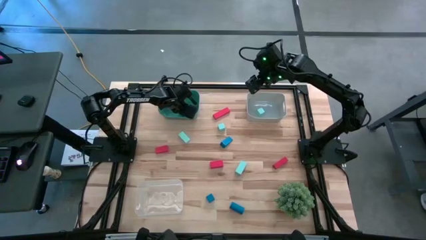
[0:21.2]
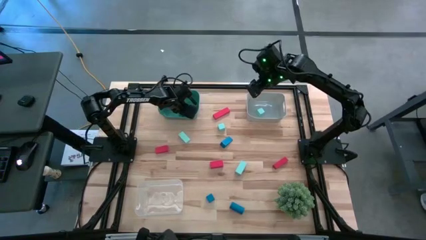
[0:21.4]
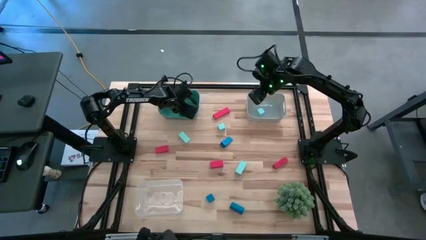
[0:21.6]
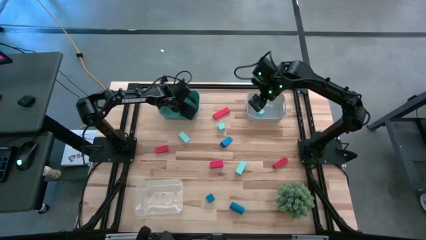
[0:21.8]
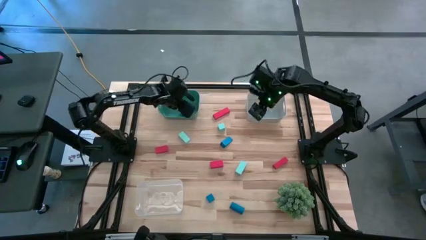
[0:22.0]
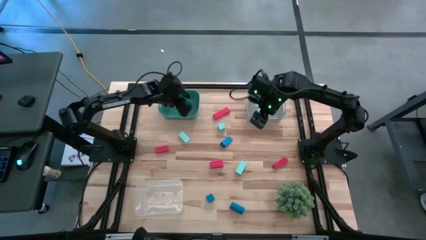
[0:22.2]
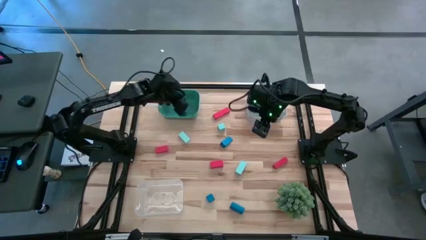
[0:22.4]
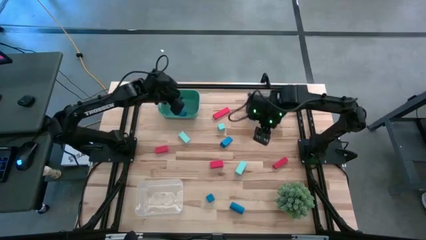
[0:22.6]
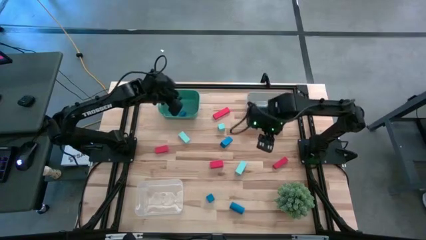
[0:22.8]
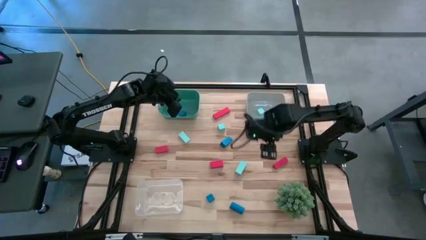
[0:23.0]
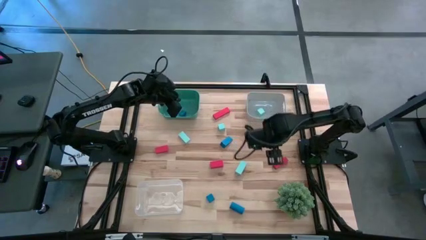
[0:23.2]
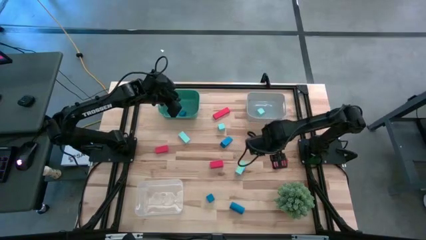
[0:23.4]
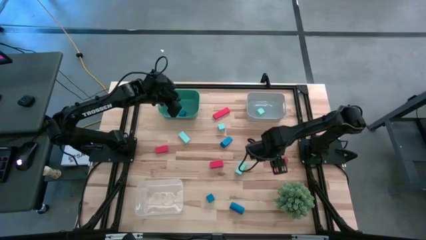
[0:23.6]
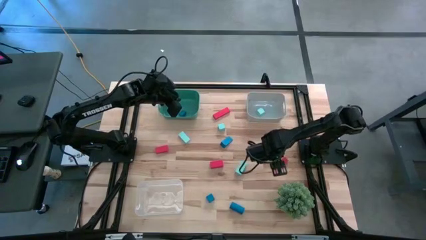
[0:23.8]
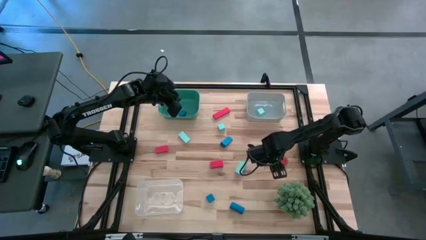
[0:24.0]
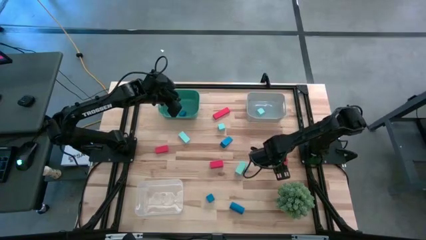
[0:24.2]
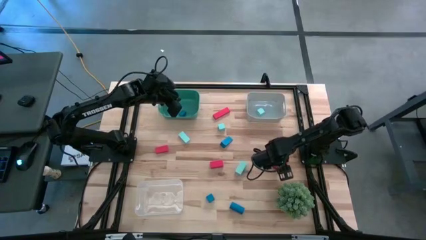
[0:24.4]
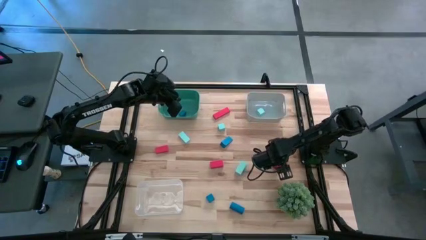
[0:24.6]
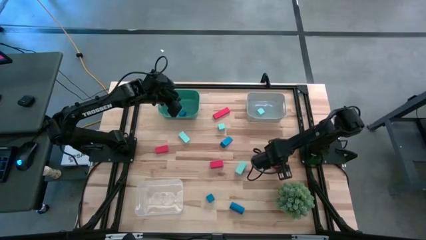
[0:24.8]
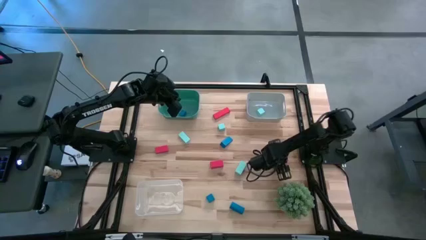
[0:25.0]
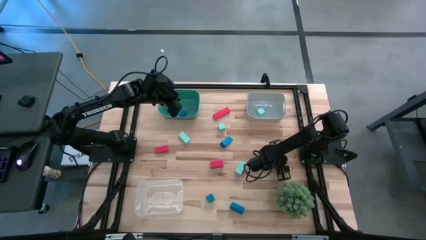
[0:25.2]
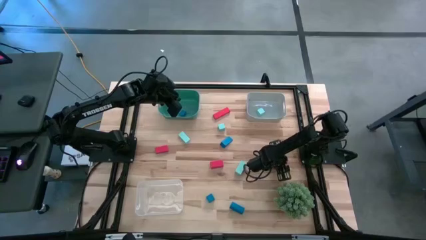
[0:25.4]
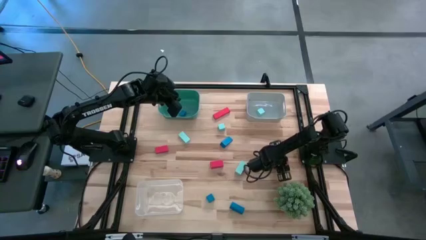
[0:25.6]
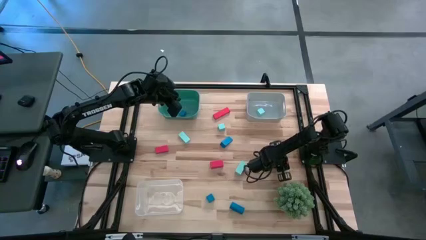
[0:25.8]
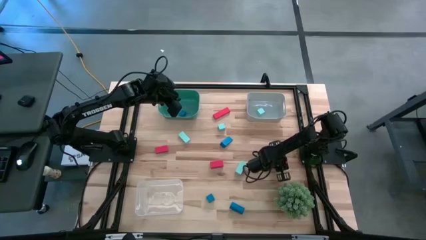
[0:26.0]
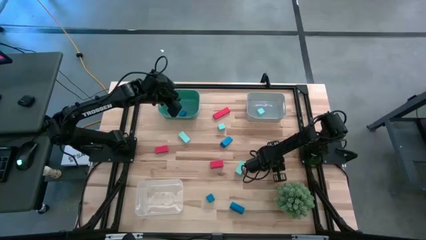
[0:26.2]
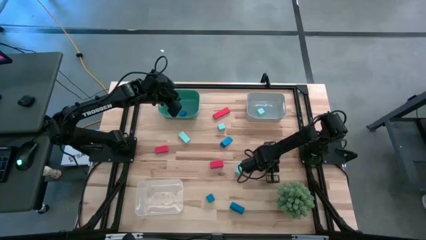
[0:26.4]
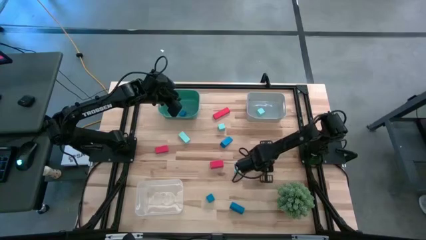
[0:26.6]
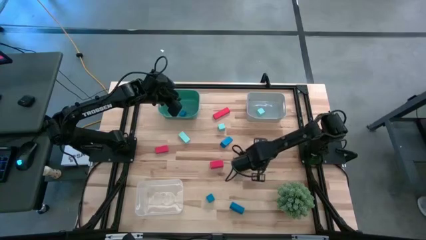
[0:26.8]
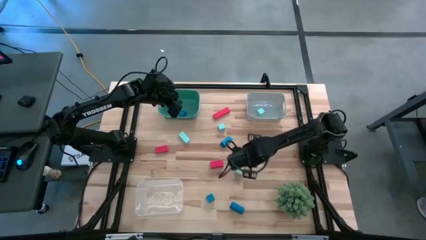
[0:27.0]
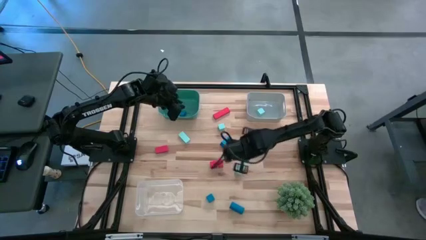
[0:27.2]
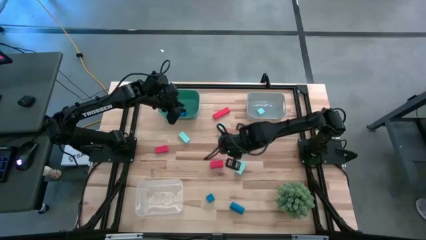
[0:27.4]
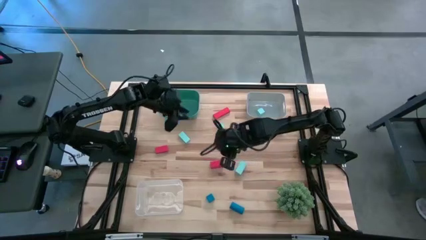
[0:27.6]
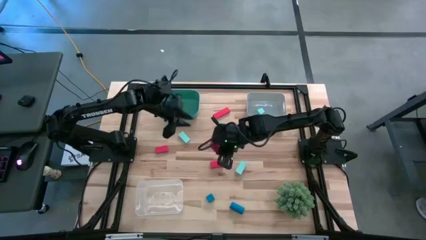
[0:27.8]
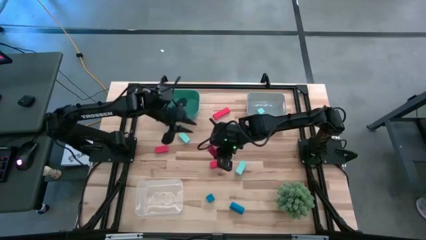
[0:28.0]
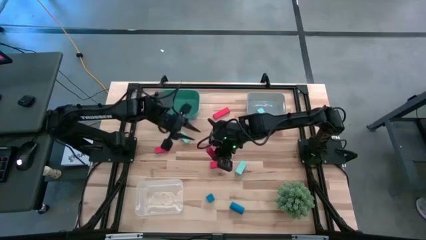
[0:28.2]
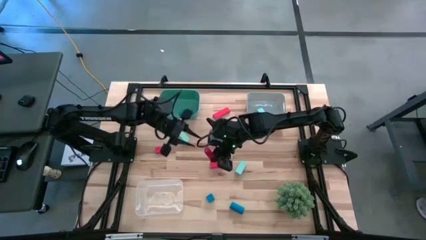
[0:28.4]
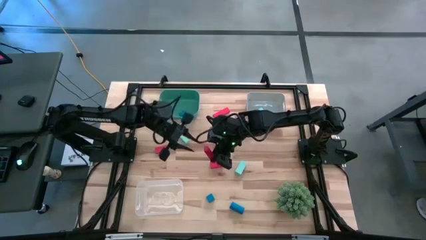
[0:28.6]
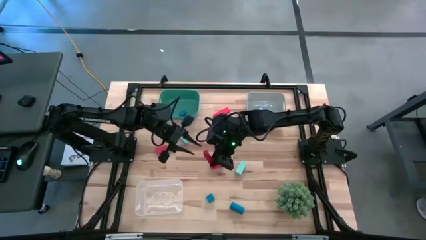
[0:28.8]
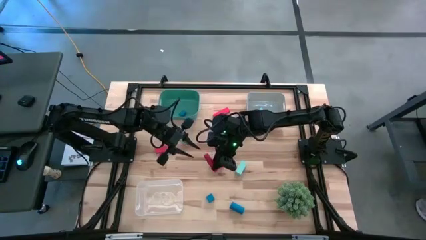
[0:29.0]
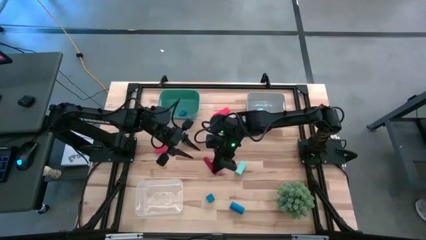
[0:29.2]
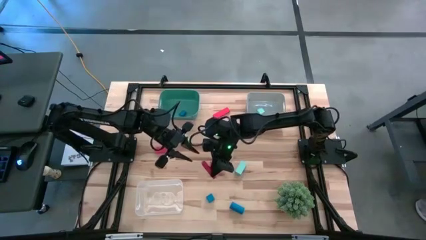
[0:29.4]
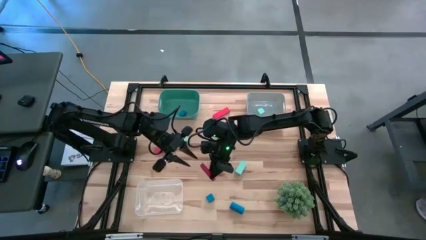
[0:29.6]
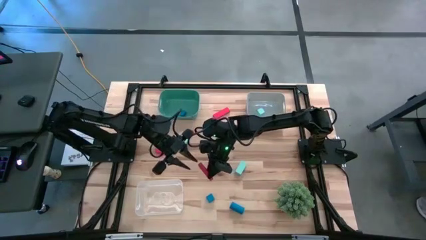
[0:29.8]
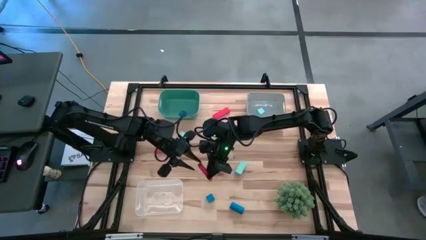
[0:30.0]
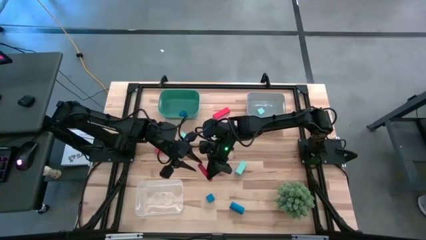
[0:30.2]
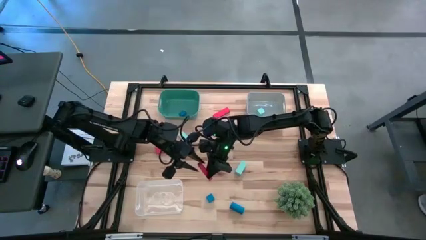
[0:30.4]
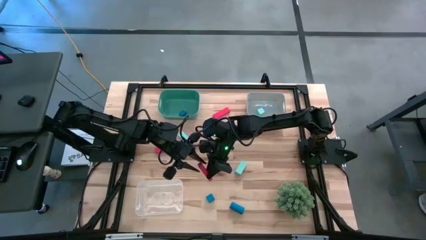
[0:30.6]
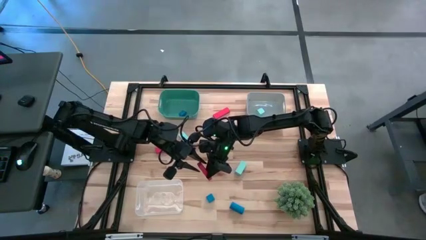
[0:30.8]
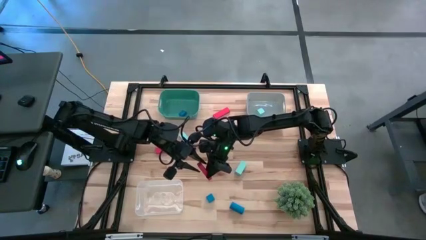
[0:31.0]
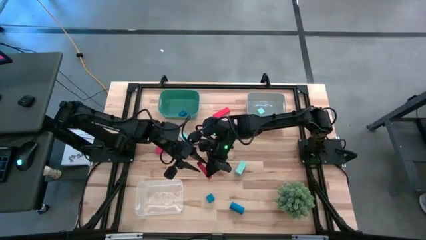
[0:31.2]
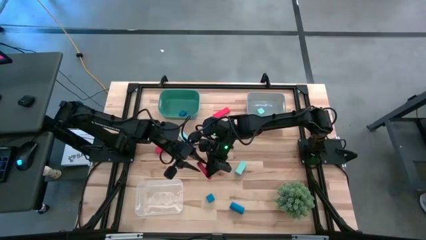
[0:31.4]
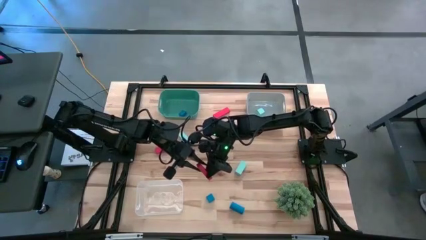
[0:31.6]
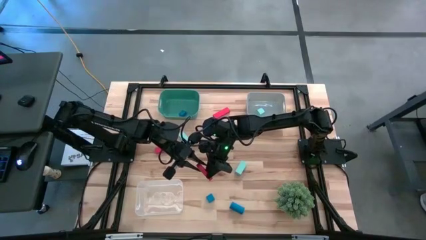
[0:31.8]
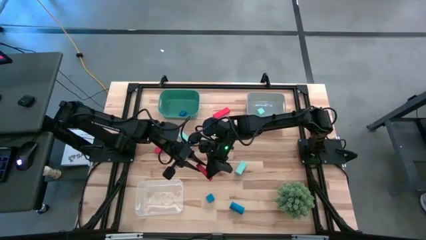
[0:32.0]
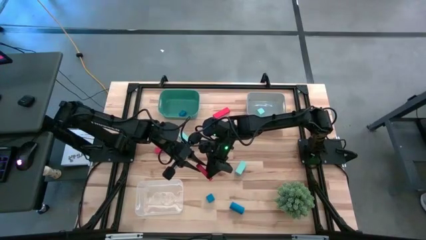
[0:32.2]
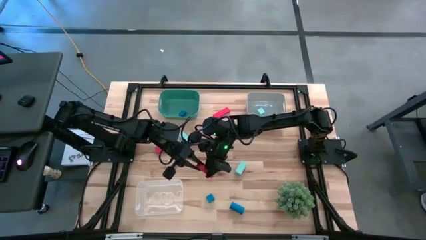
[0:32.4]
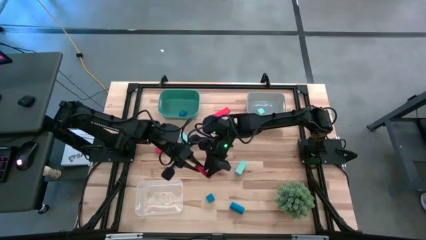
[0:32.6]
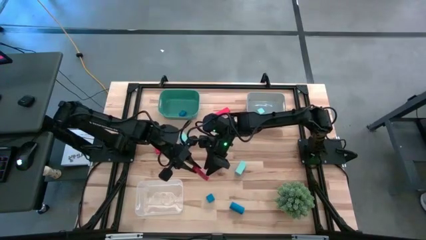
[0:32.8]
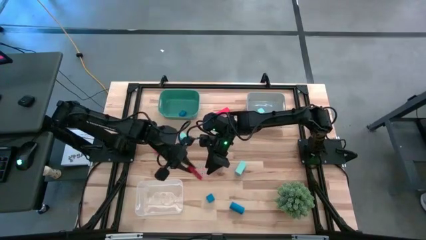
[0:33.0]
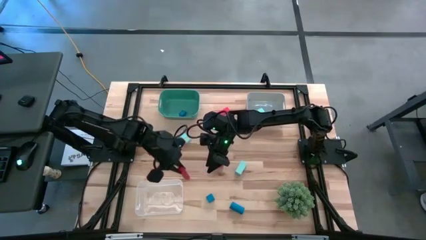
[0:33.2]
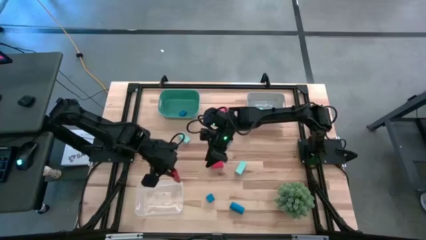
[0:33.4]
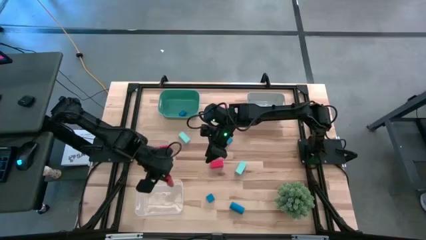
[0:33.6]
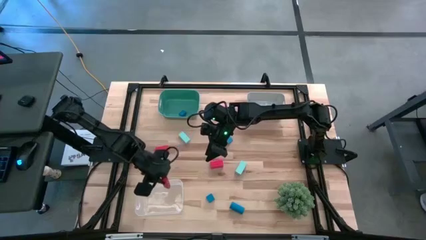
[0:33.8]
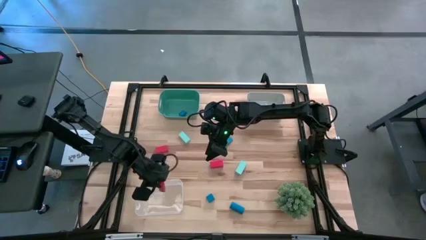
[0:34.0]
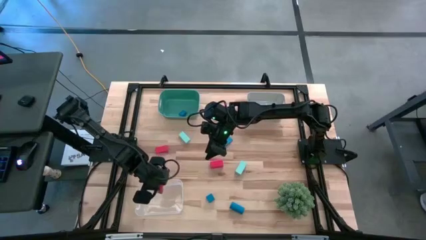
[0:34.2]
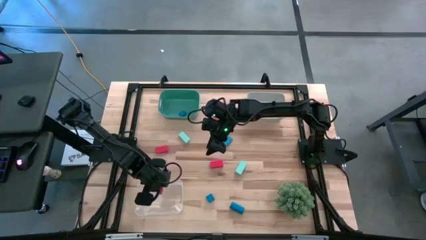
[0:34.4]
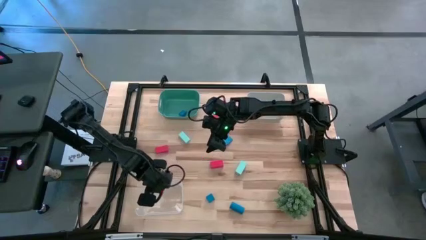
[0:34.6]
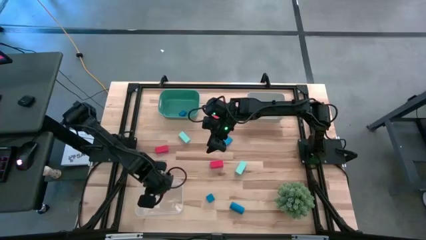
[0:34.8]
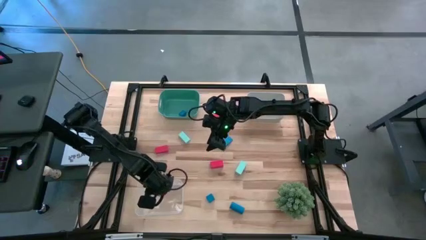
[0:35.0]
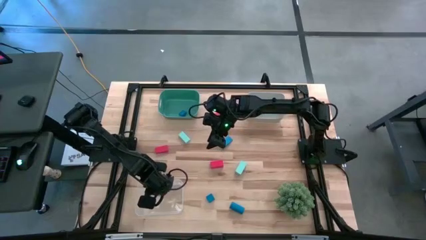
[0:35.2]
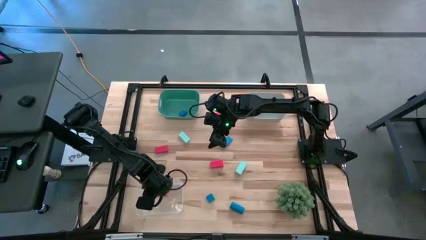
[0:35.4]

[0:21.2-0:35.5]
Task: Sort & place blocks by color
Put the red block into the transparent bin
